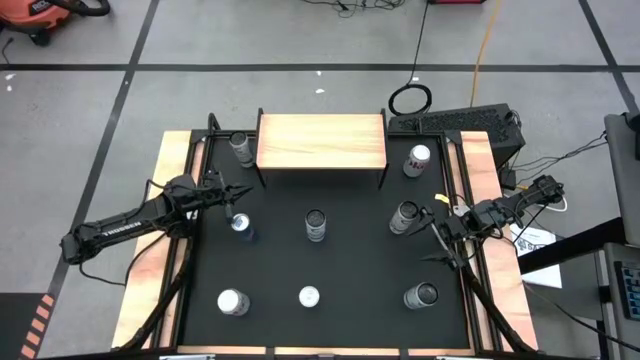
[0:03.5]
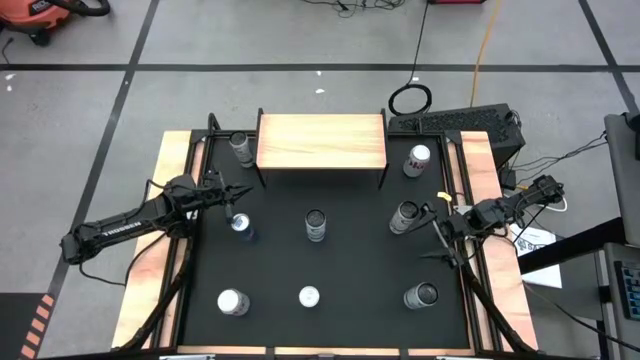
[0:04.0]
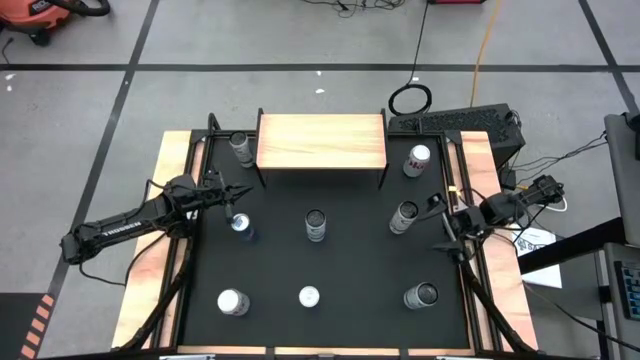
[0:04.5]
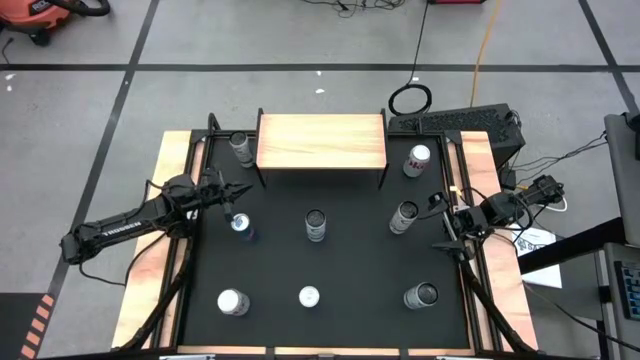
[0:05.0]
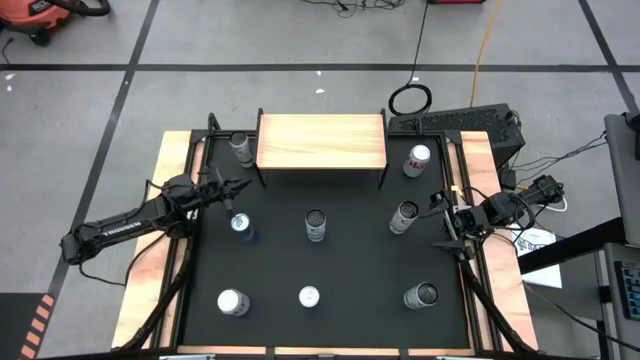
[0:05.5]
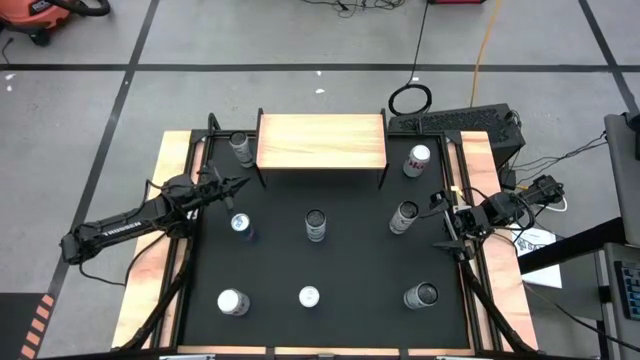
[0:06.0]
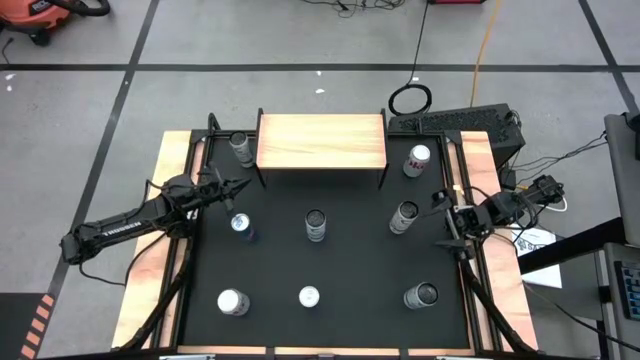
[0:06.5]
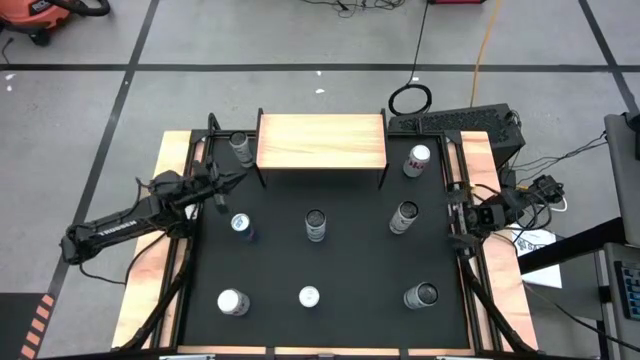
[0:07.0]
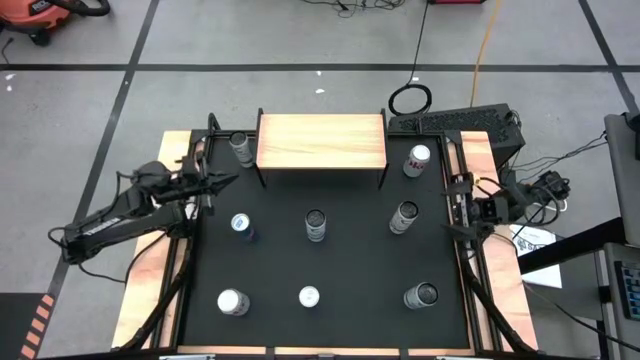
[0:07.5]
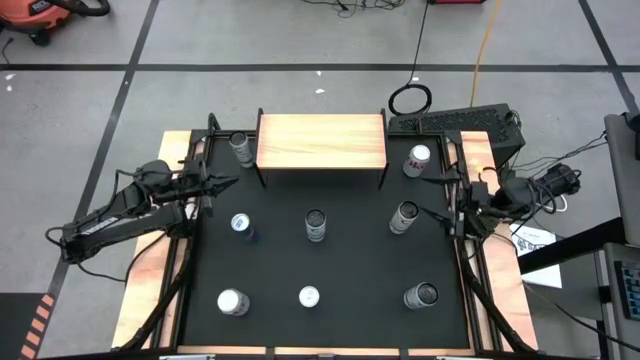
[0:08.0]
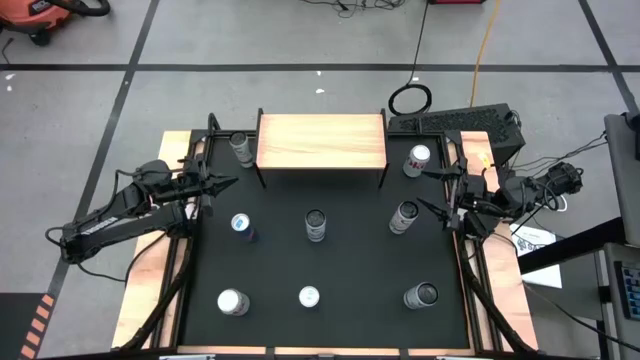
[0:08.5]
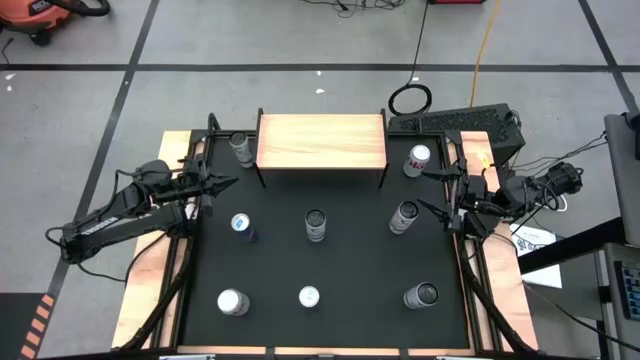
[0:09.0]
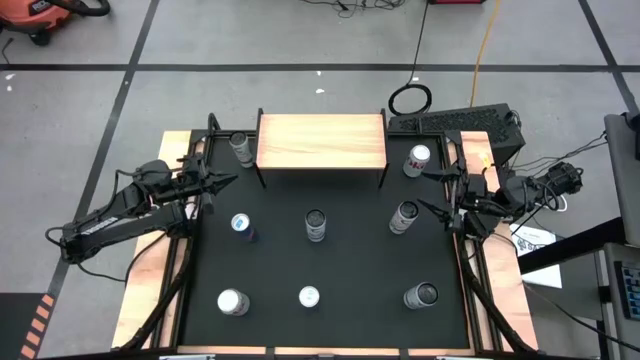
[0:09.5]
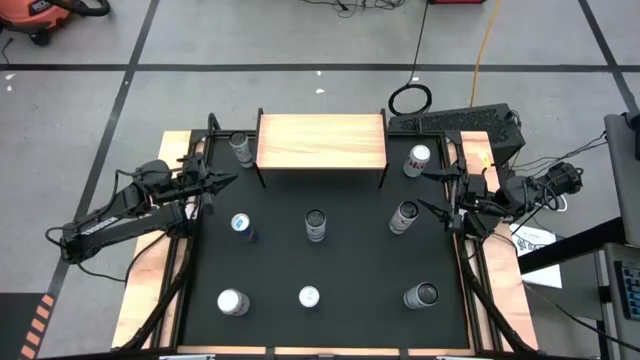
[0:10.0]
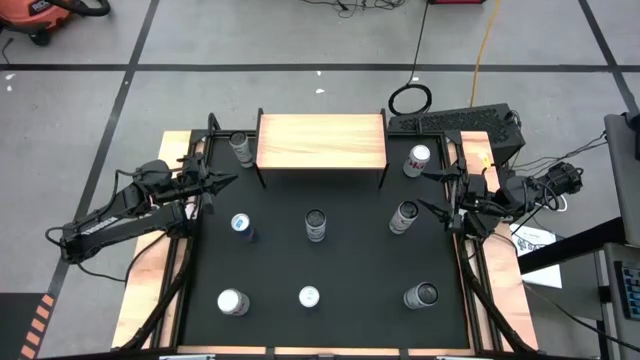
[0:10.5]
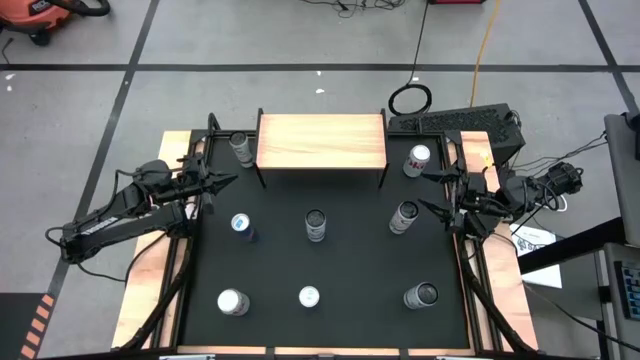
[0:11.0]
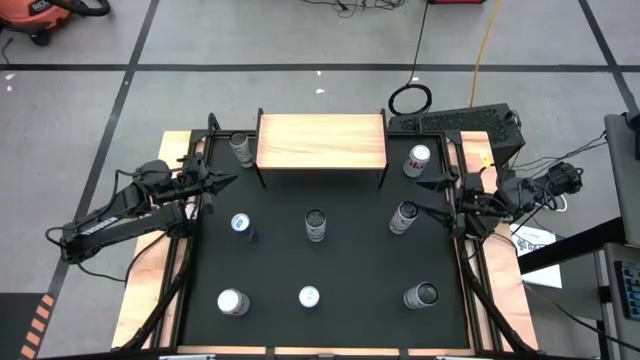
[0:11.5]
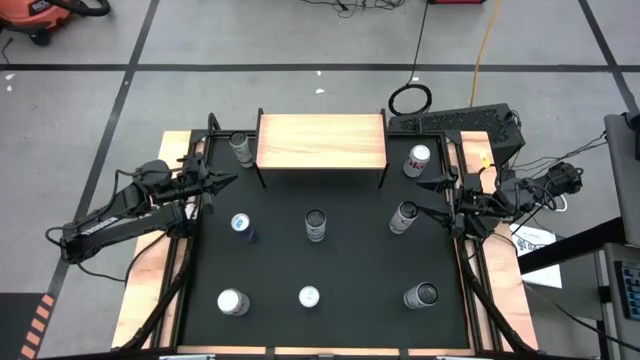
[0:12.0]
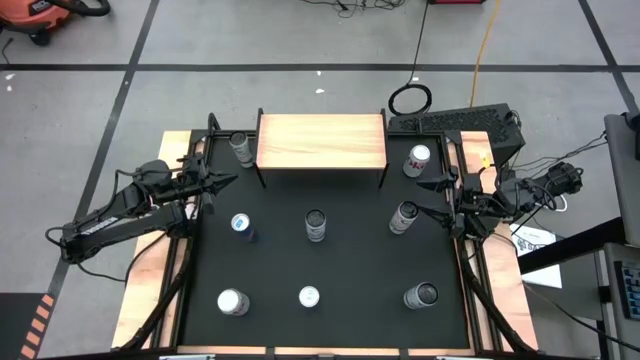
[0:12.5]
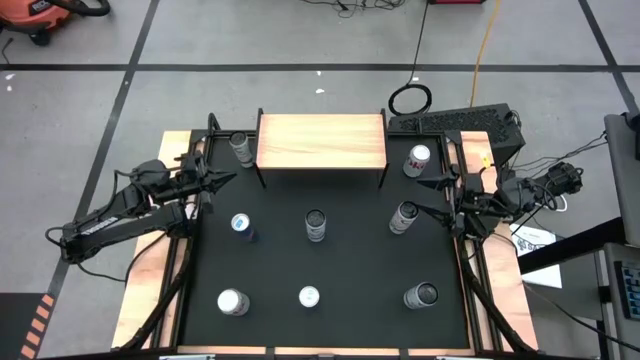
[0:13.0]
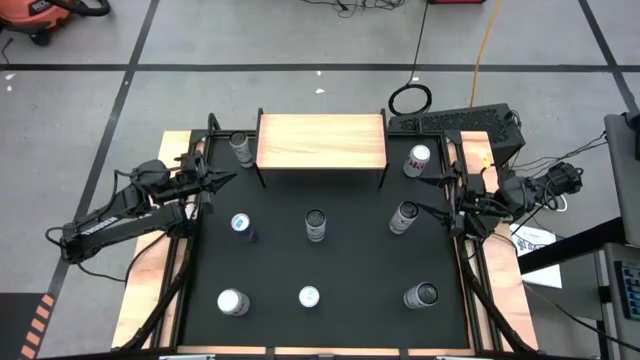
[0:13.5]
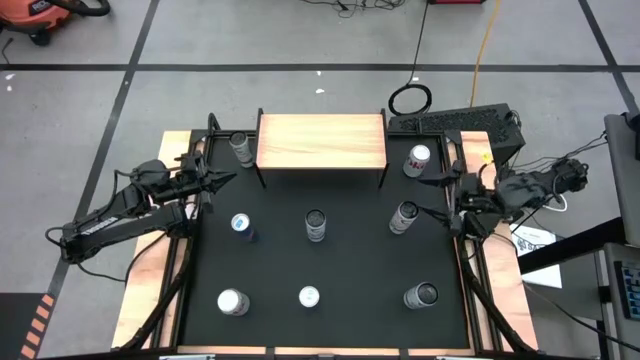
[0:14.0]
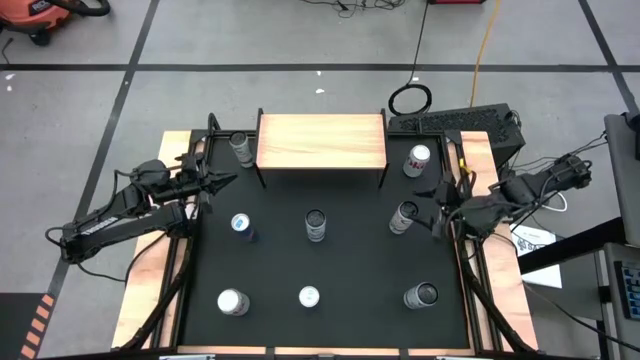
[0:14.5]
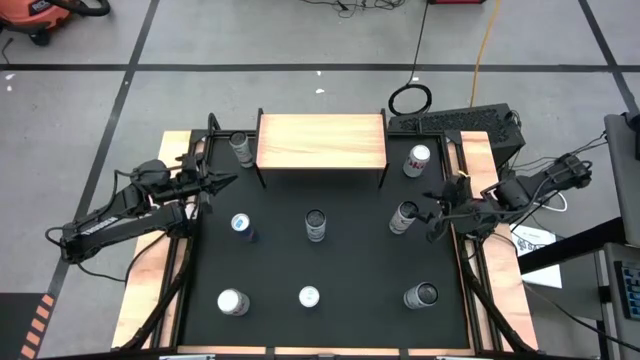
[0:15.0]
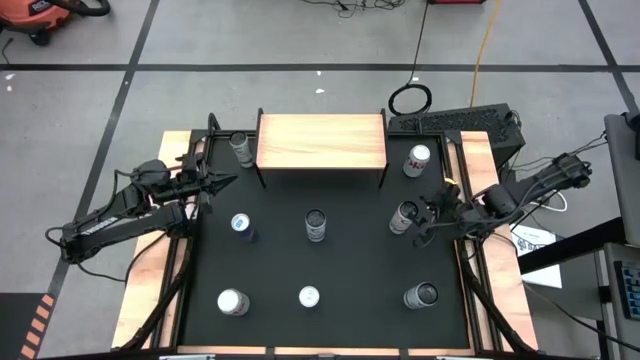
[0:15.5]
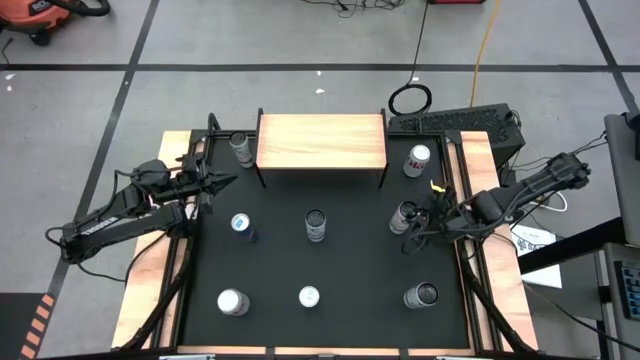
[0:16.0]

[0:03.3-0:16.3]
Task: Place canned beverage on shelf
Put the right white yellow soda can on the shelf
